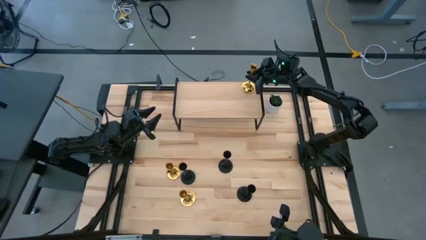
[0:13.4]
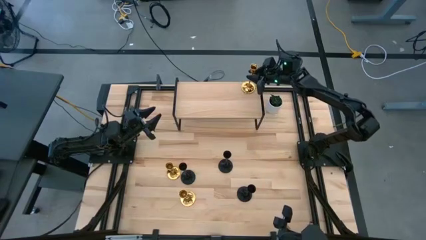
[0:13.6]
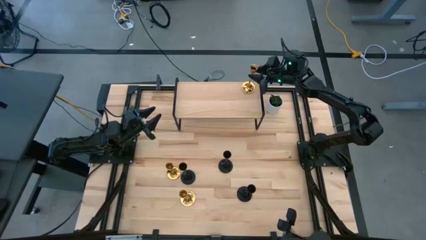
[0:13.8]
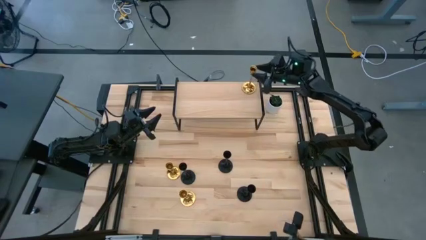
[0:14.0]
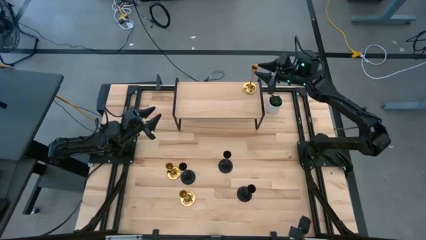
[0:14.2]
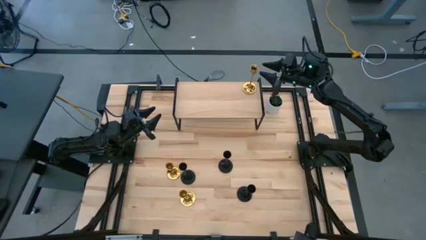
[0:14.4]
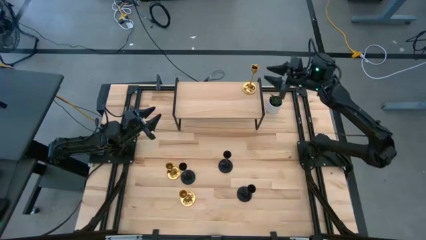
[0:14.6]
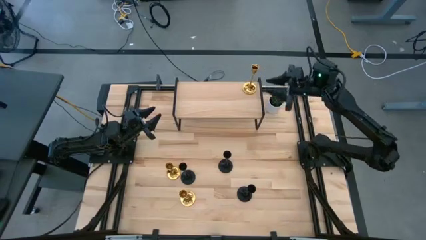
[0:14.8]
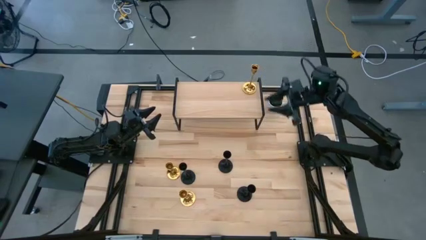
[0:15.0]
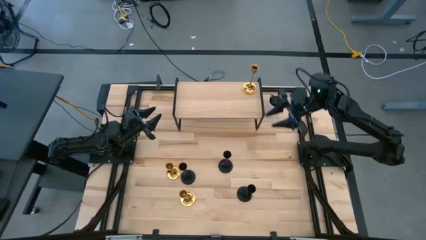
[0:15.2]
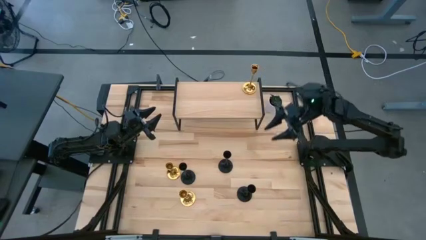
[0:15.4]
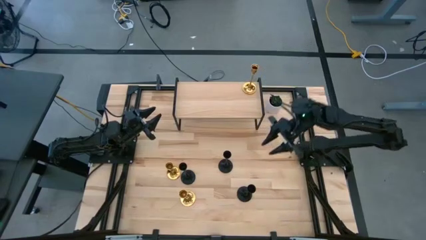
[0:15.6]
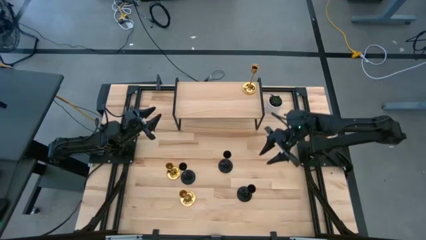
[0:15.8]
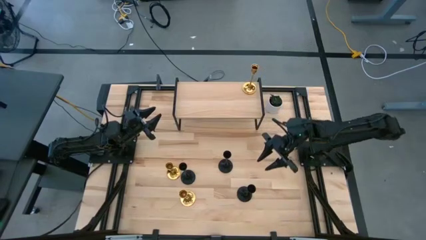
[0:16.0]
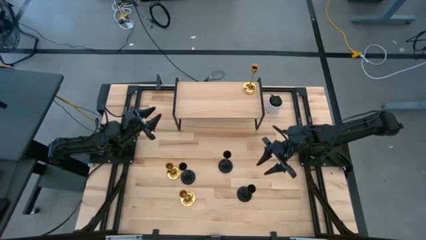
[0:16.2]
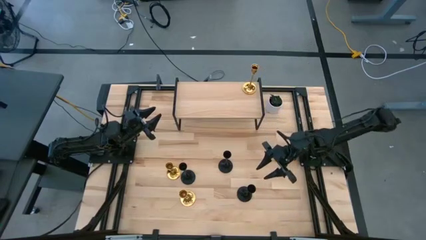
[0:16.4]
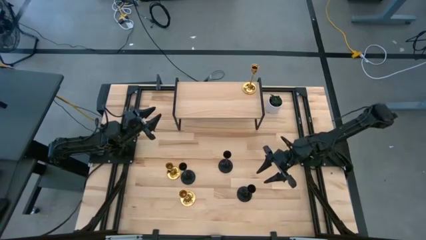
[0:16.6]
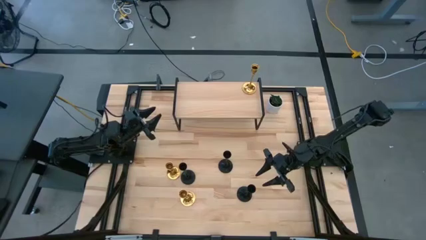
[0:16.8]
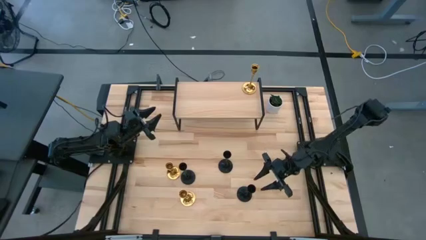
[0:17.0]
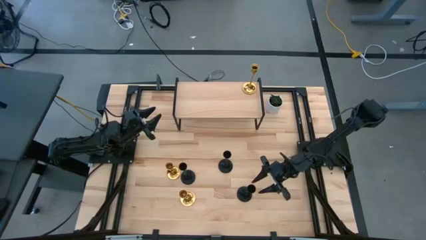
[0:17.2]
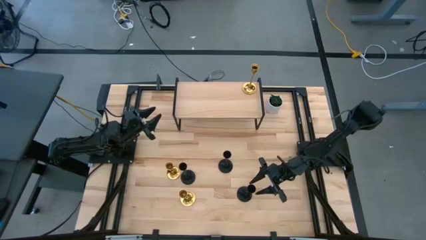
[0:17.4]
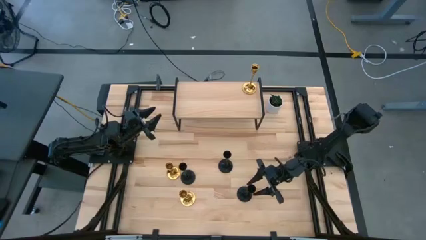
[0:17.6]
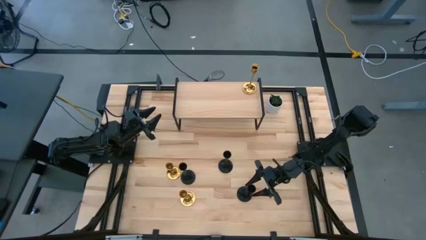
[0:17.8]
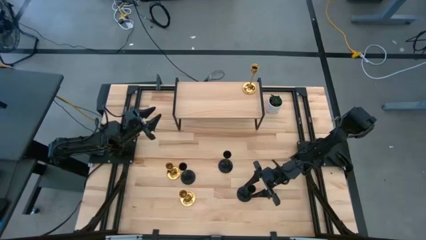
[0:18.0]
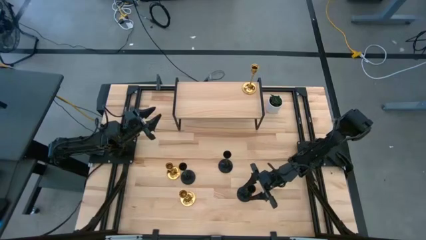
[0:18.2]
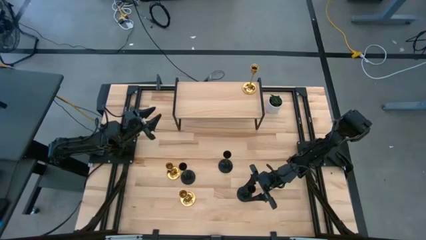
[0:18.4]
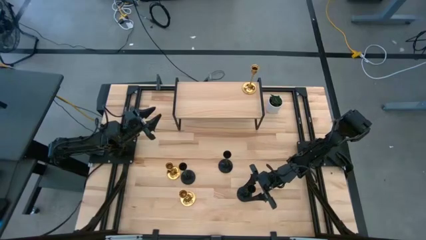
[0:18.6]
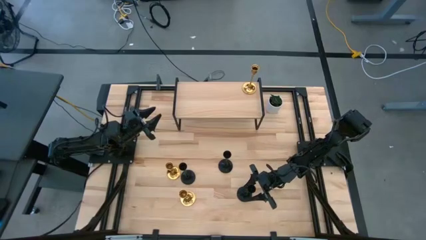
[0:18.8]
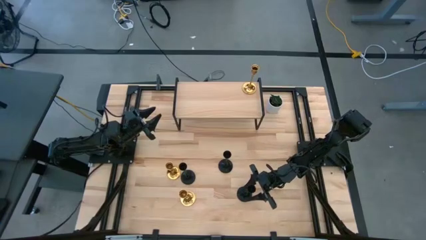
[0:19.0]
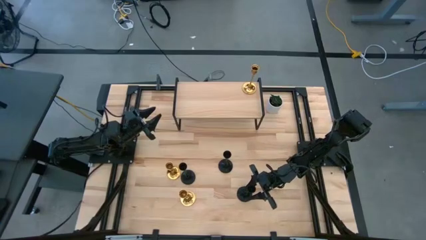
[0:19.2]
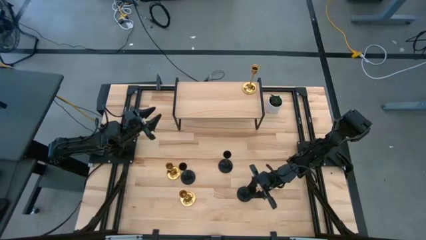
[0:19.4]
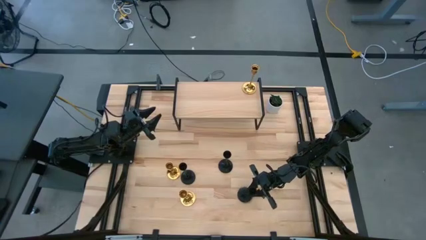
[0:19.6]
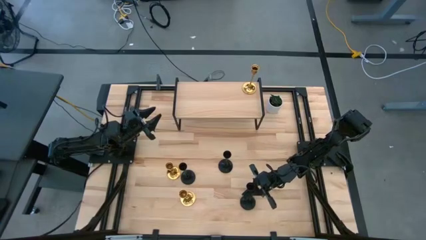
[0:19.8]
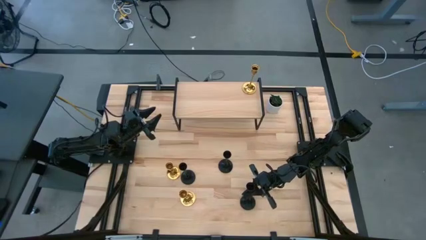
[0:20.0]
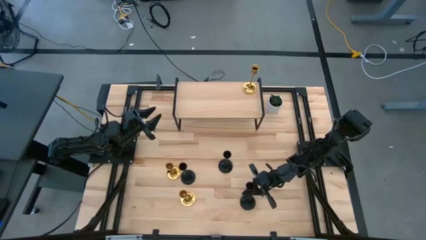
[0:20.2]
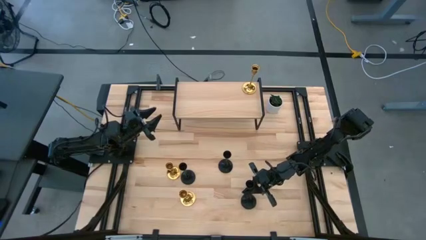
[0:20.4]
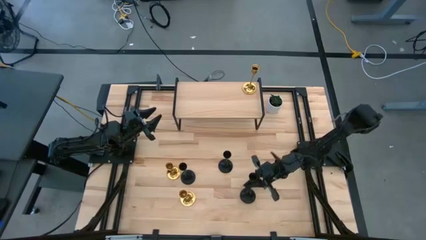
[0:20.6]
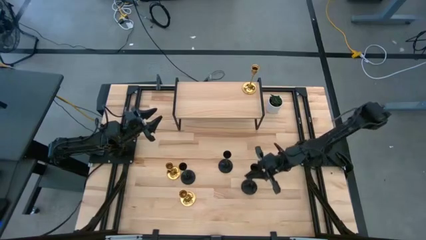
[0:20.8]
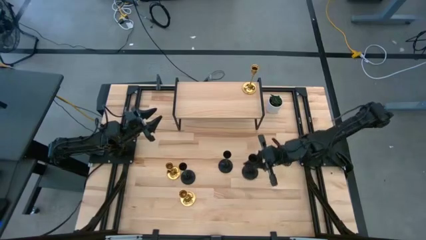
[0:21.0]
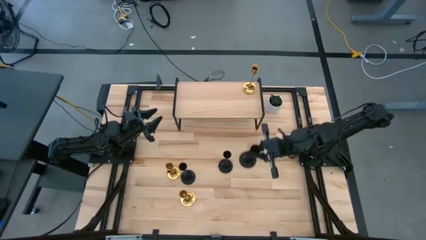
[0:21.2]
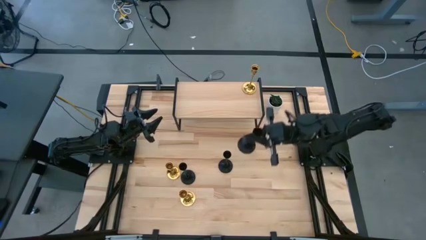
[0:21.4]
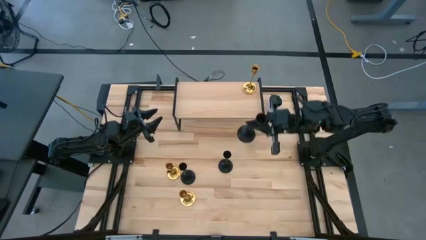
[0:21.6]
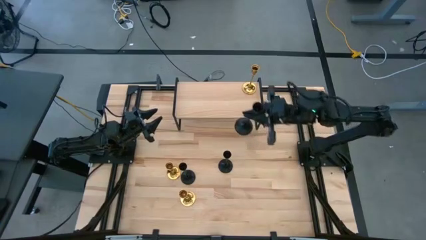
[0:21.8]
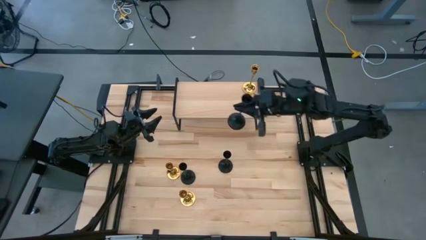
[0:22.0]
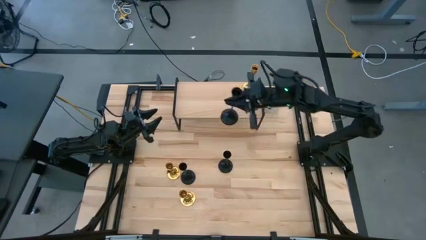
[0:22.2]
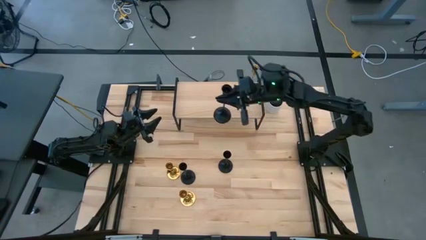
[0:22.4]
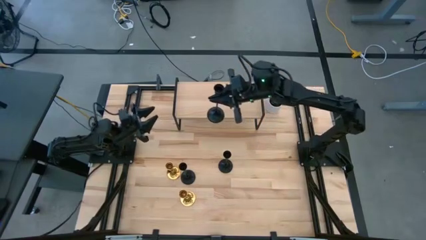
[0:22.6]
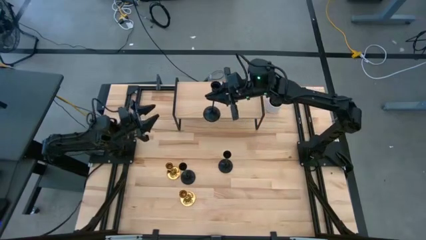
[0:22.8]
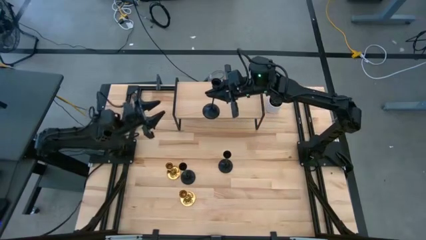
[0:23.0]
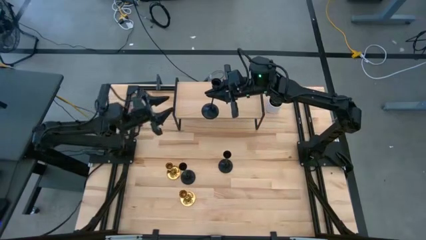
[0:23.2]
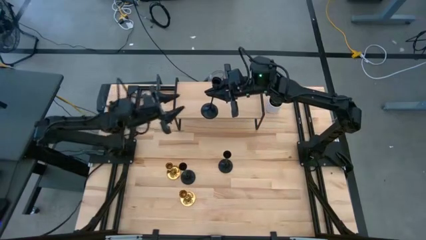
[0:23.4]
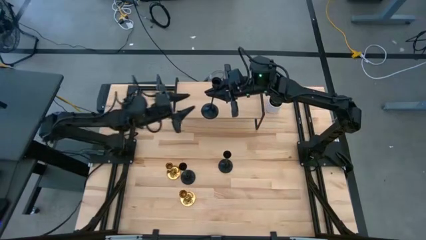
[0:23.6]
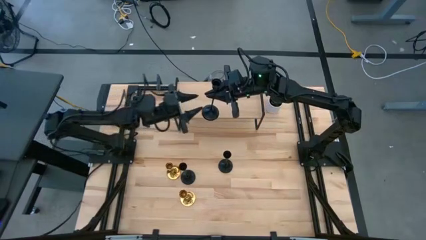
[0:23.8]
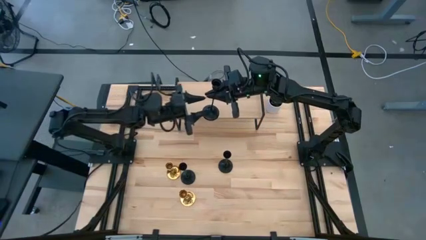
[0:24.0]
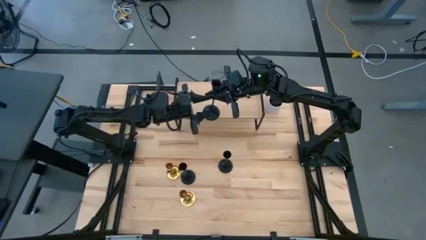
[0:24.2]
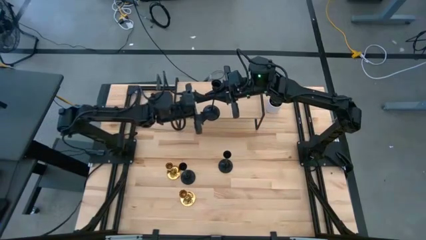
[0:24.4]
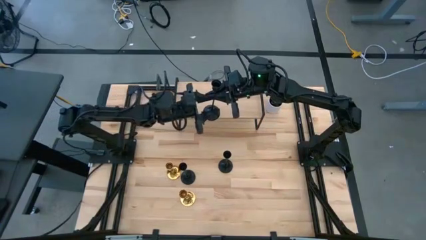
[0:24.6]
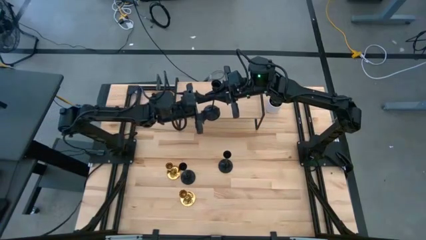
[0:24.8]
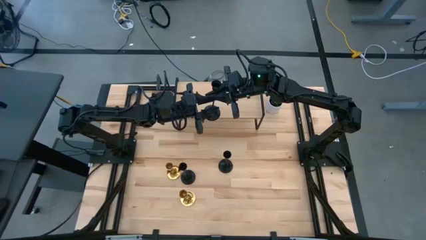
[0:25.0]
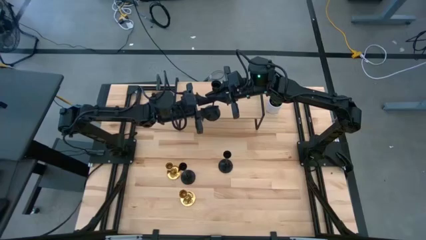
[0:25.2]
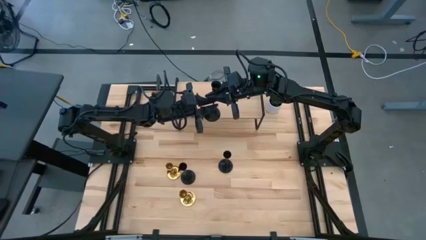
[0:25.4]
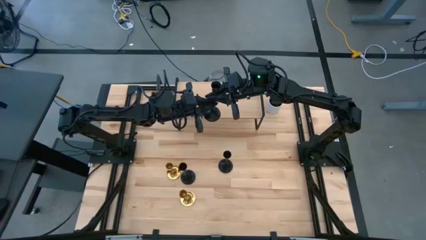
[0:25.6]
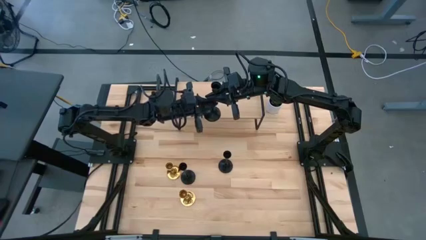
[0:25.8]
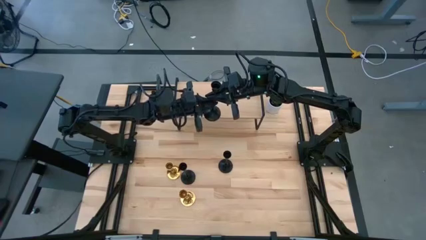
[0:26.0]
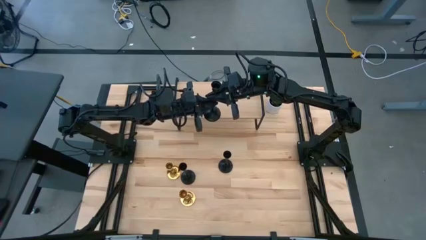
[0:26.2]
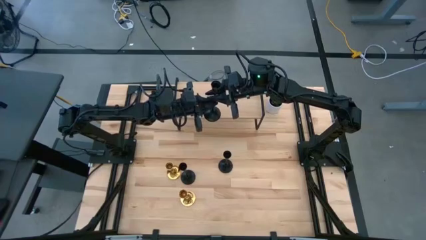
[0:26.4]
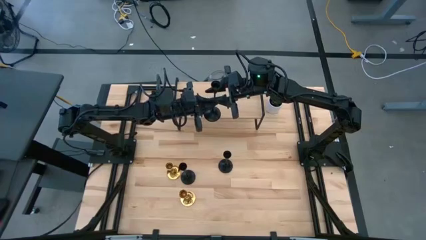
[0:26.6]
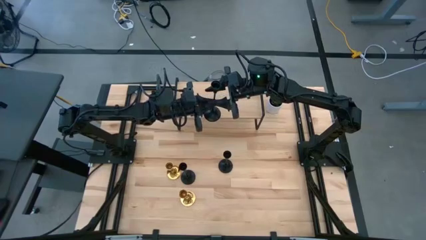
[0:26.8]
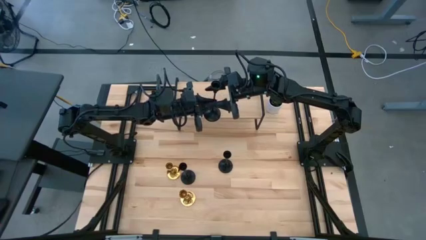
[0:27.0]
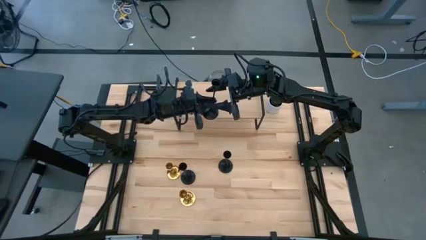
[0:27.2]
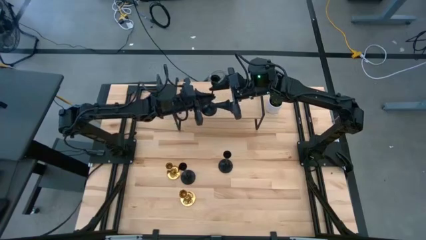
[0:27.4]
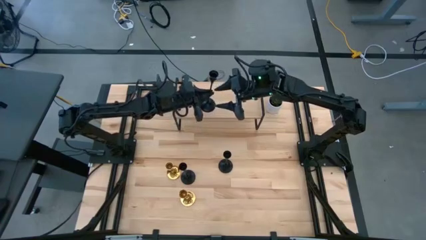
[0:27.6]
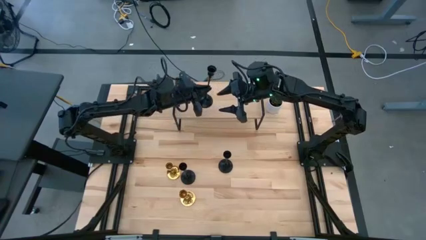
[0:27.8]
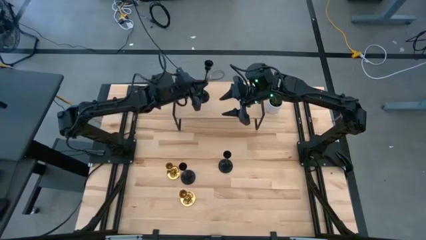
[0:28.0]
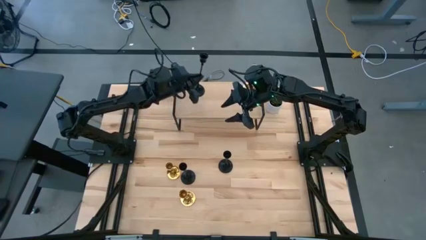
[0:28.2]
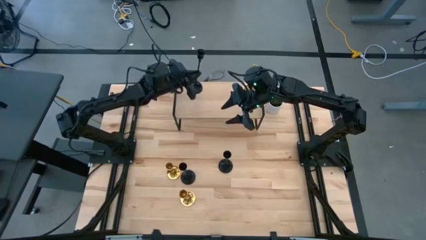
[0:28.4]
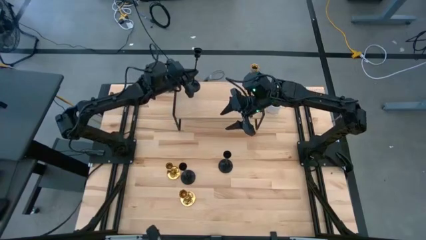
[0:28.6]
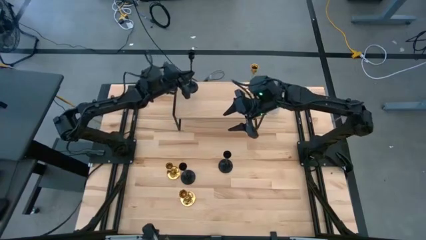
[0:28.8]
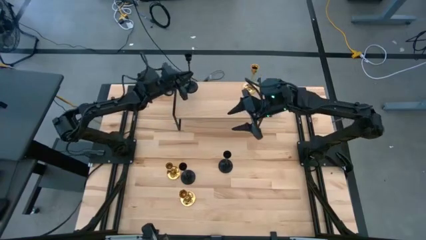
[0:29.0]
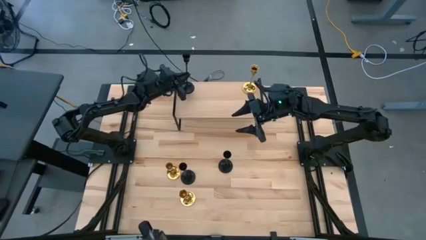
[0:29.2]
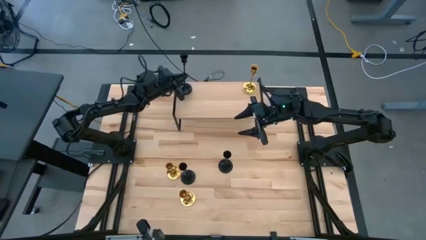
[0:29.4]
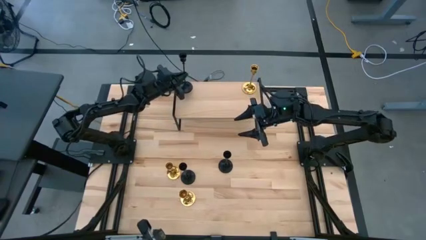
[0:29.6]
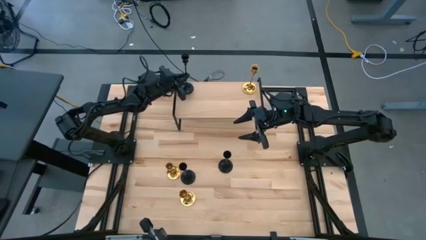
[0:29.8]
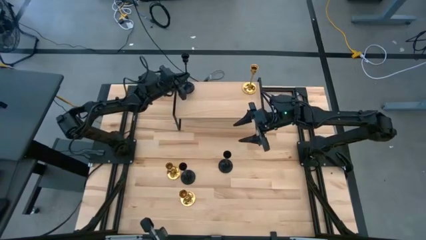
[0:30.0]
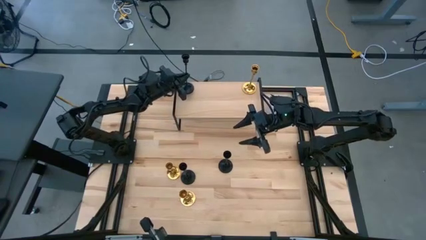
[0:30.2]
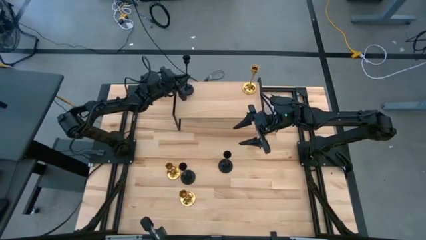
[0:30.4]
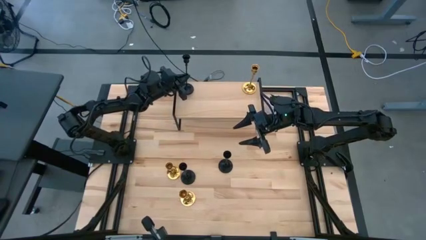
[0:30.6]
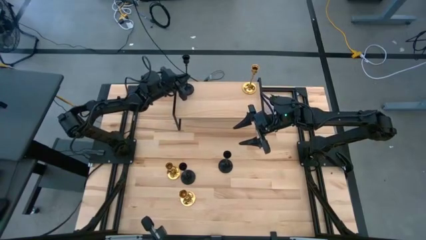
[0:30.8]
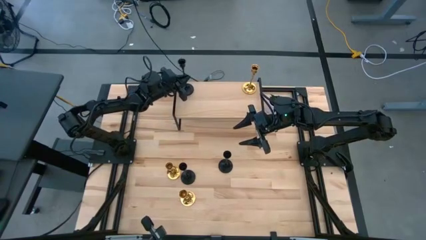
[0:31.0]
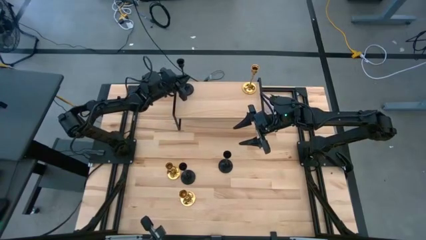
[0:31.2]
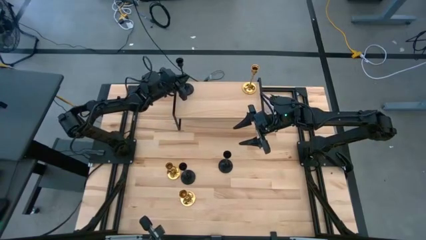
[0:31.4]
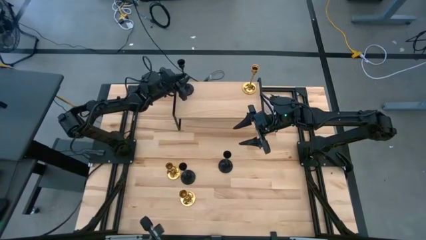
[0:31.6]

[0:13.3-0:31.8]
Task: Pick & Place candle stick holders
Put the bottom black candle holder on the shelf
